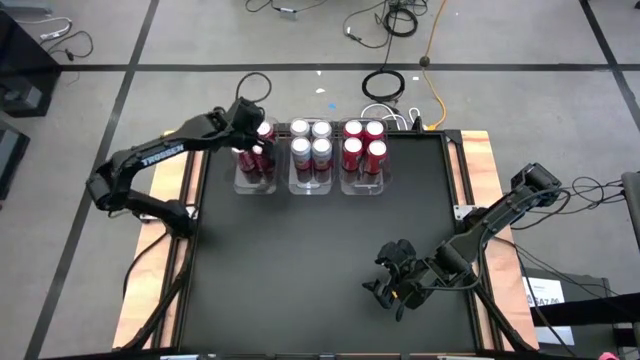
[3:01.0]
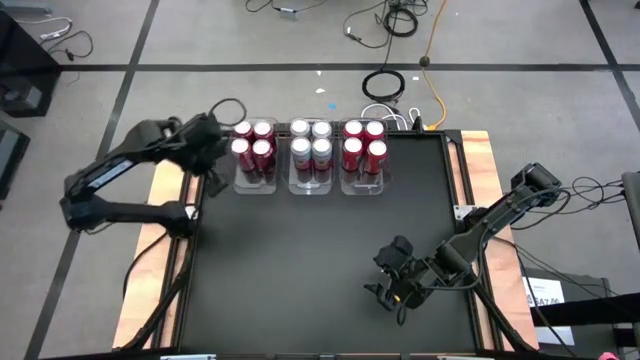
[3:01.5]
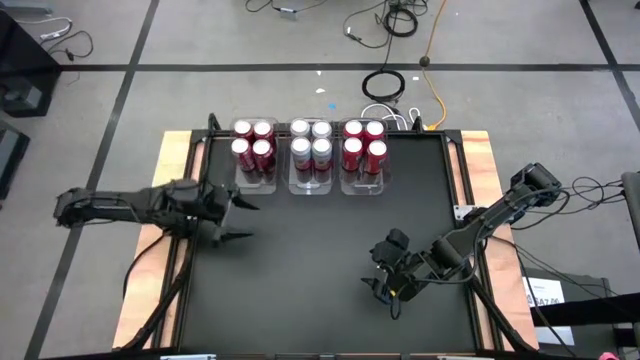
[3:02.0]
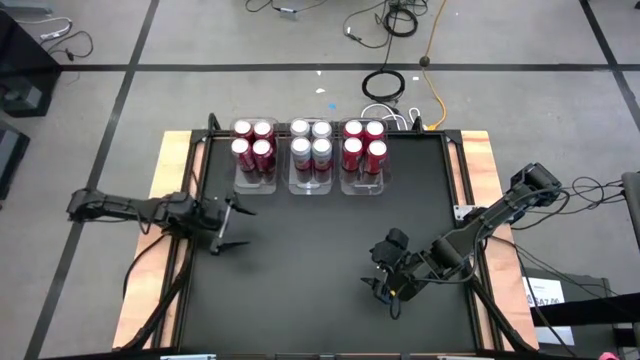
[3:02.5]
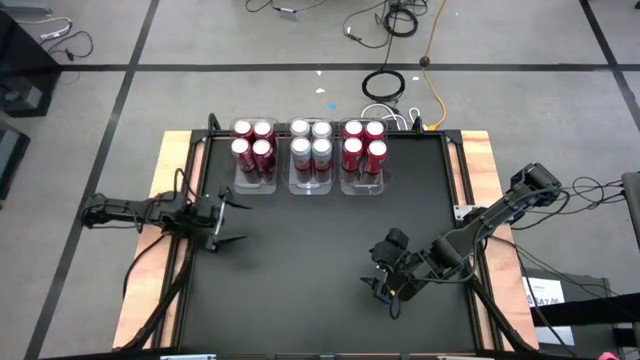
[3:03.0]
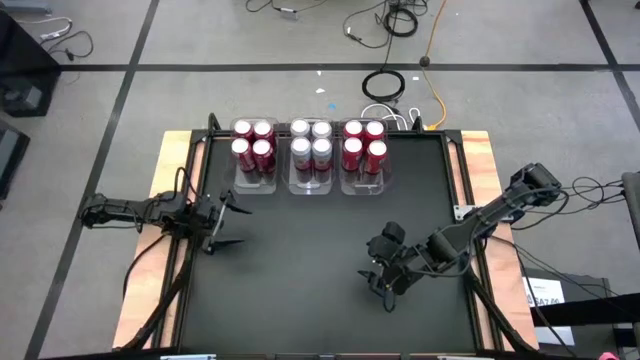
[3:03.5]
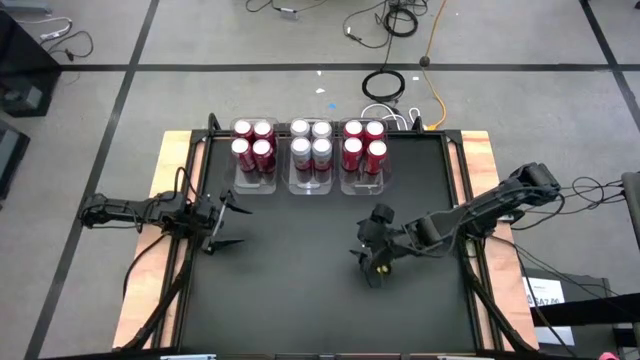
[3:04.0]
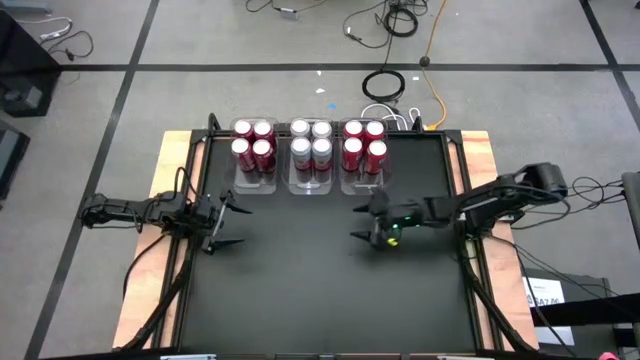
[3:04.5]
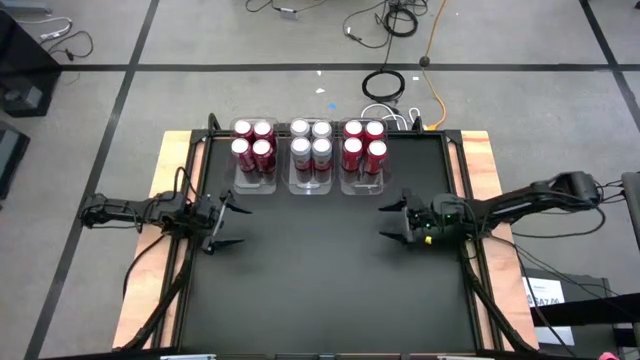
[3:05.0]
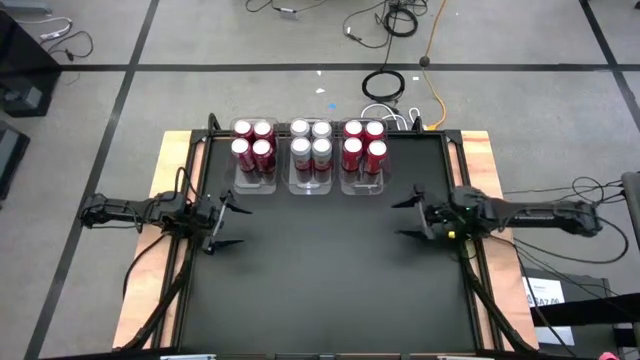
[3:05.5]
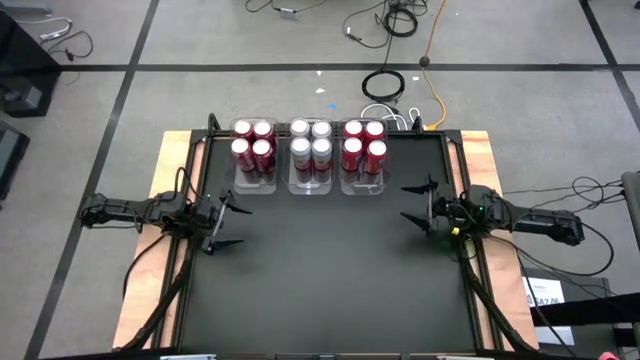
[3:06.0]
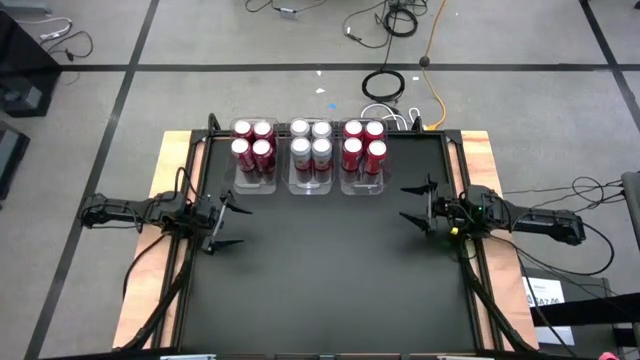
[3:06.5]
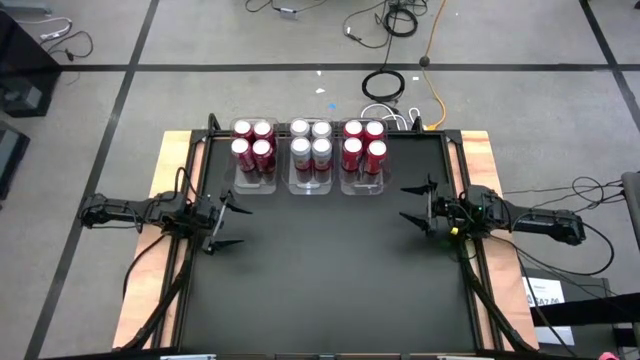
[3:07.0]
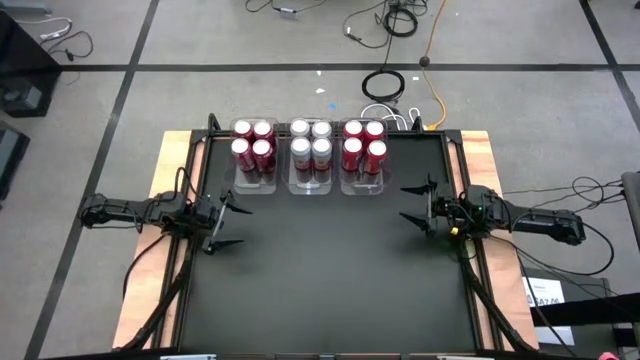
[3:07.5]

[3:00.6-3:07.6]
Task: Sort soda cans
Return to Home Position

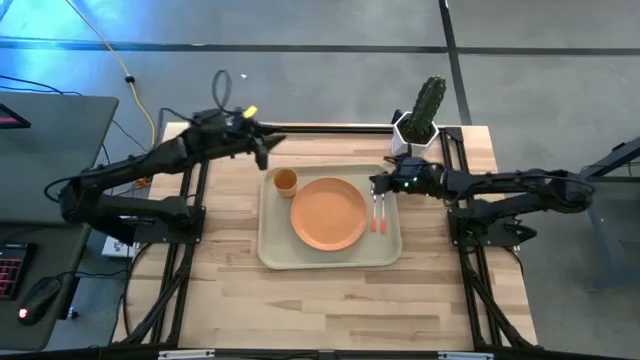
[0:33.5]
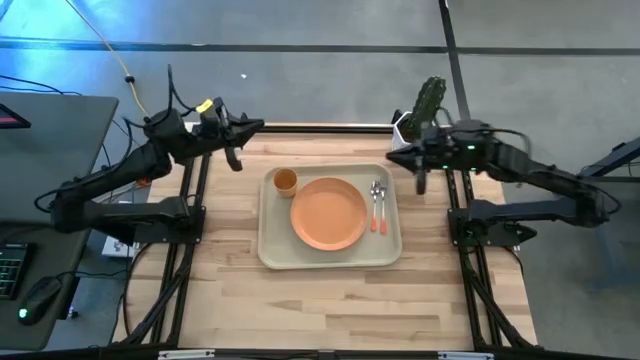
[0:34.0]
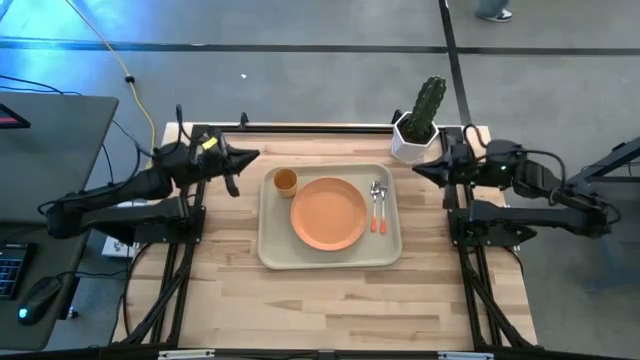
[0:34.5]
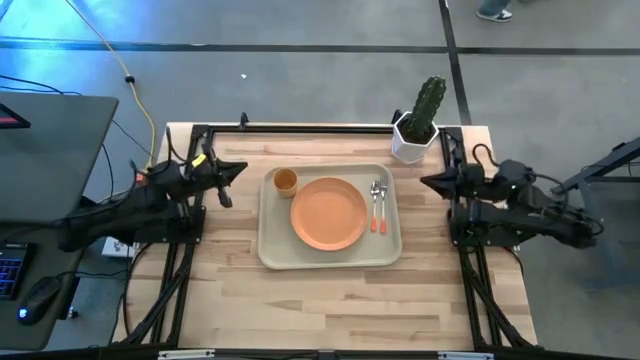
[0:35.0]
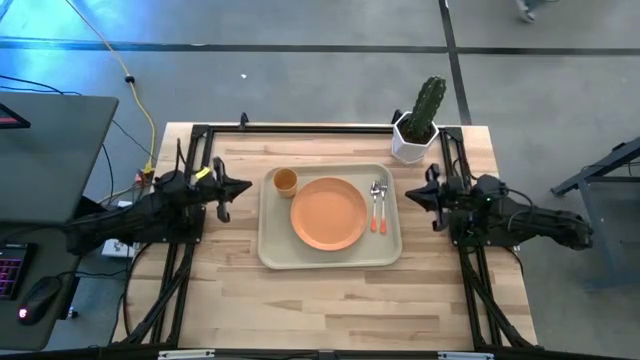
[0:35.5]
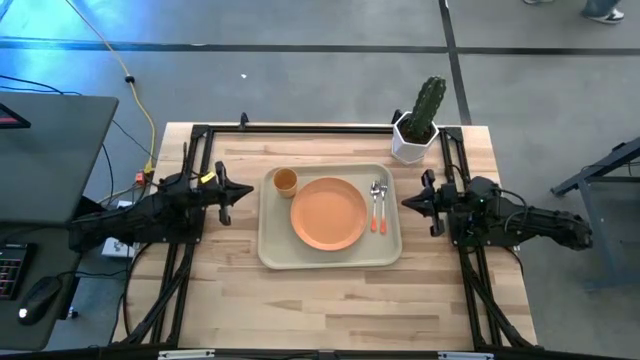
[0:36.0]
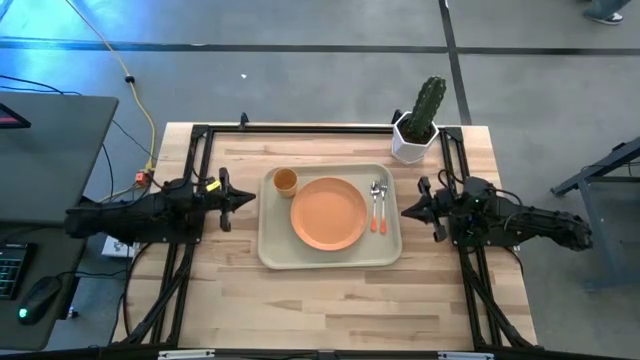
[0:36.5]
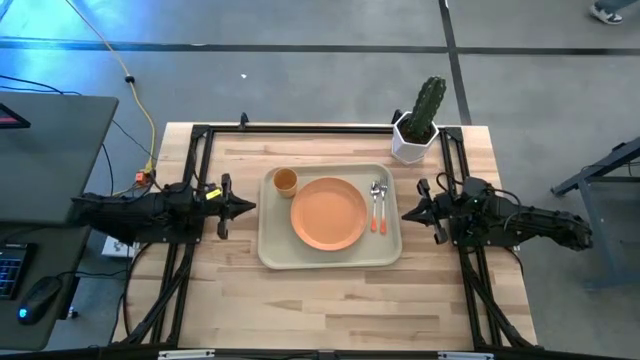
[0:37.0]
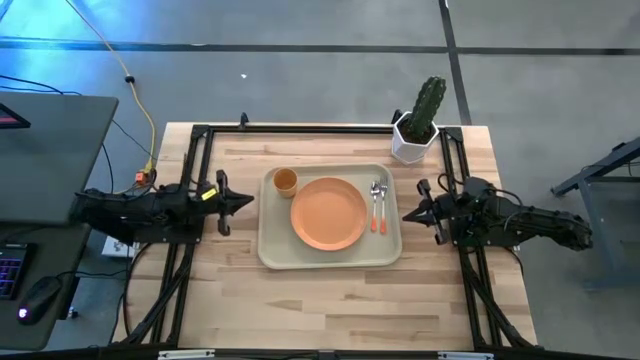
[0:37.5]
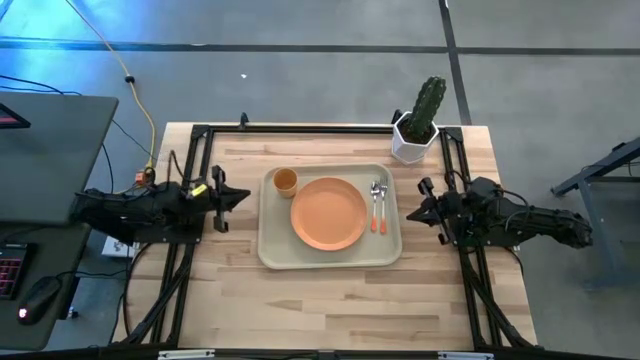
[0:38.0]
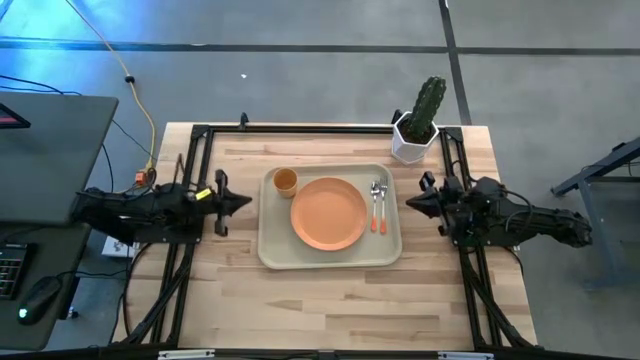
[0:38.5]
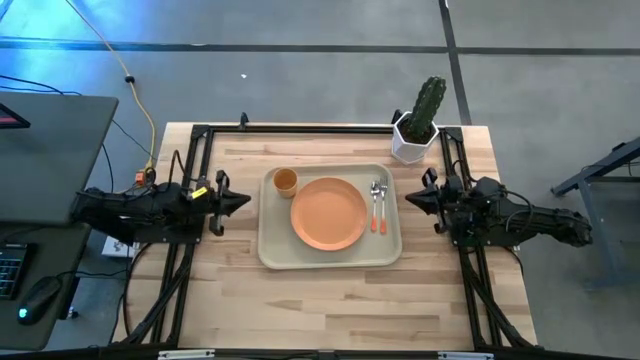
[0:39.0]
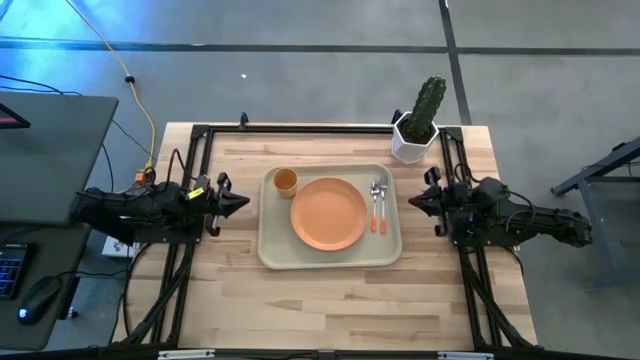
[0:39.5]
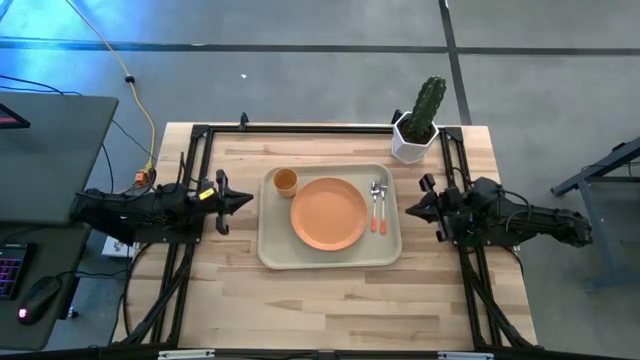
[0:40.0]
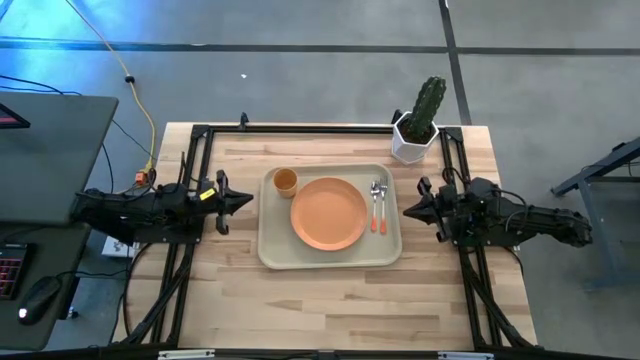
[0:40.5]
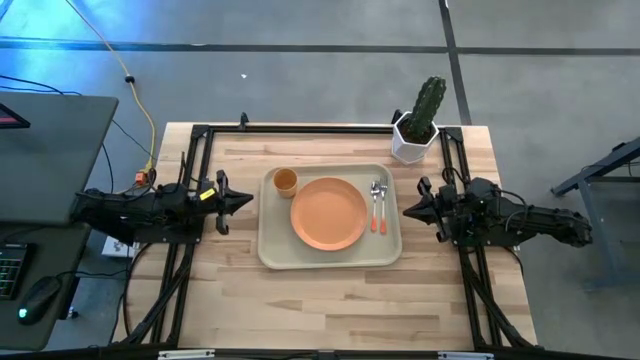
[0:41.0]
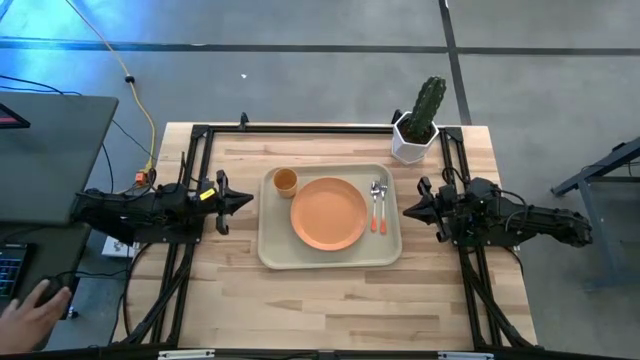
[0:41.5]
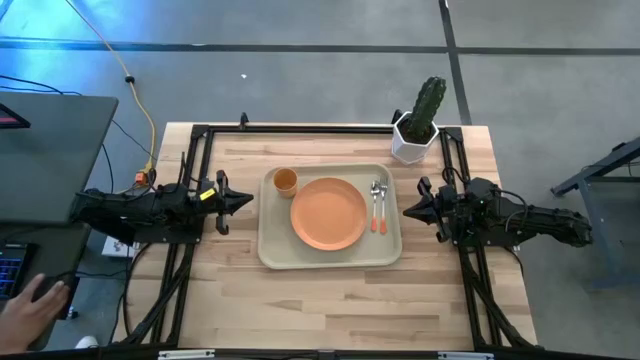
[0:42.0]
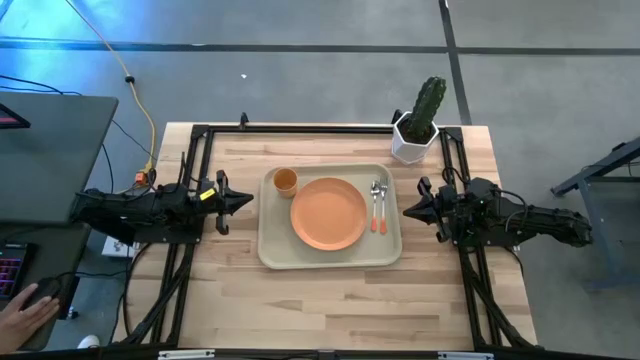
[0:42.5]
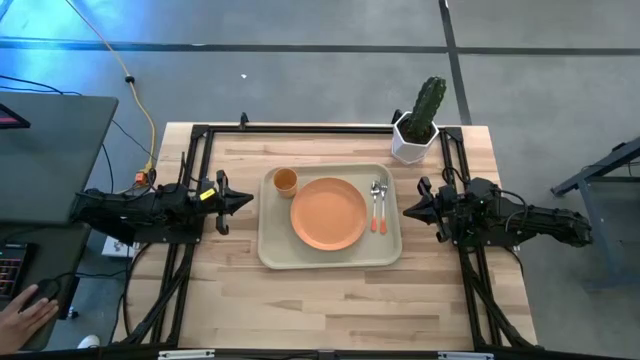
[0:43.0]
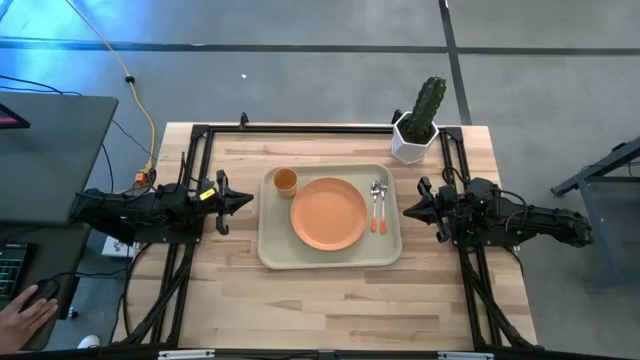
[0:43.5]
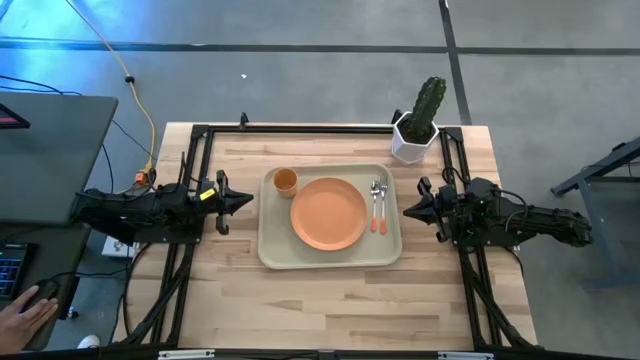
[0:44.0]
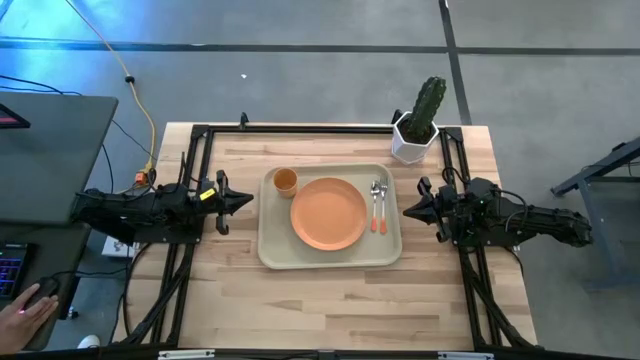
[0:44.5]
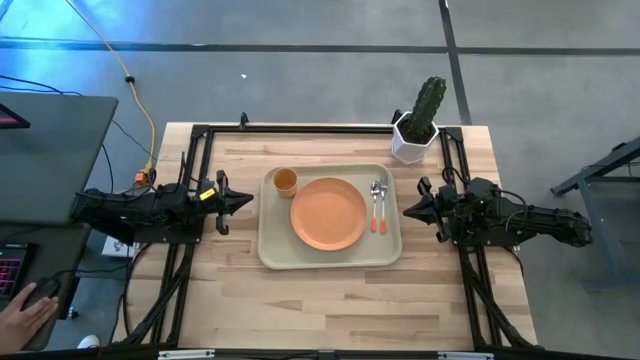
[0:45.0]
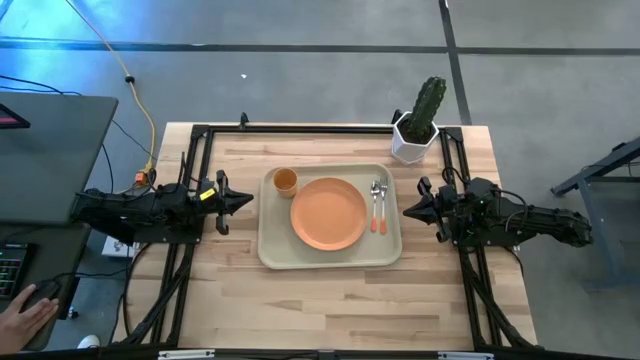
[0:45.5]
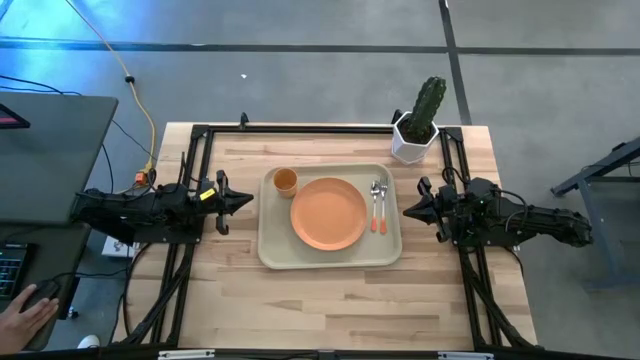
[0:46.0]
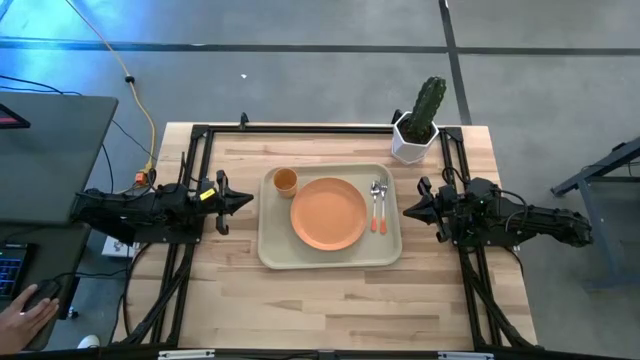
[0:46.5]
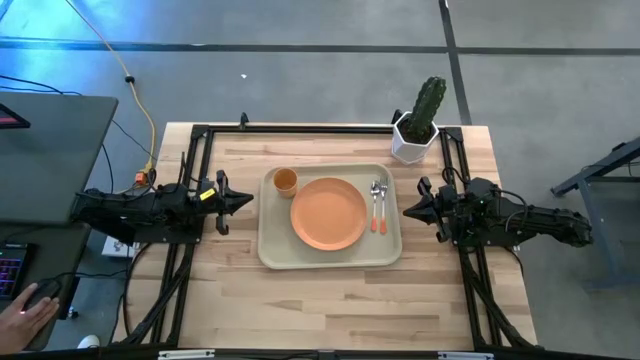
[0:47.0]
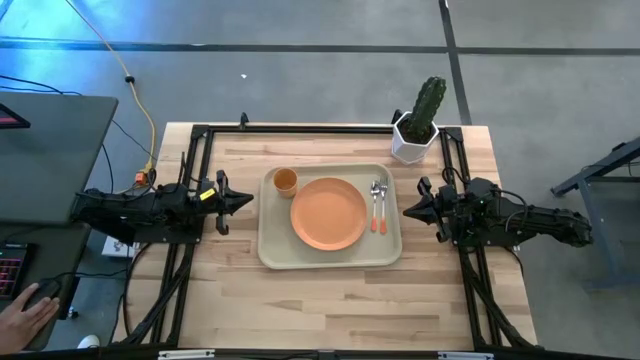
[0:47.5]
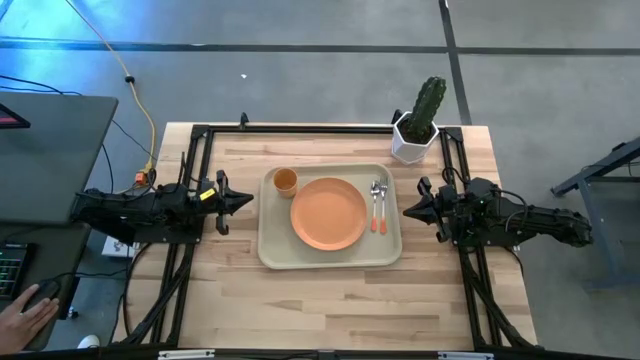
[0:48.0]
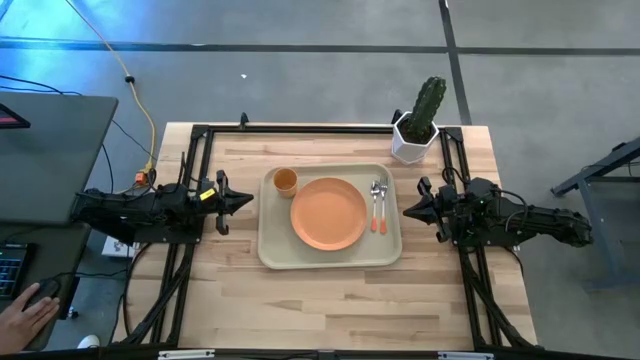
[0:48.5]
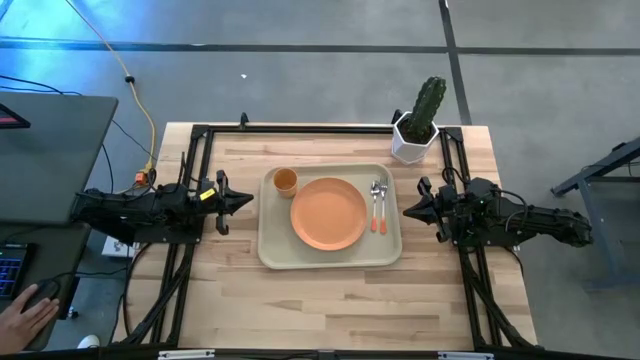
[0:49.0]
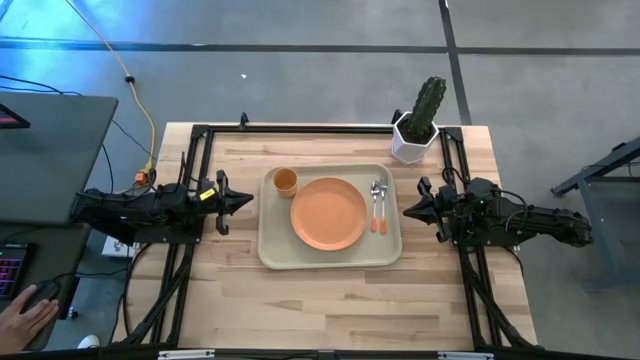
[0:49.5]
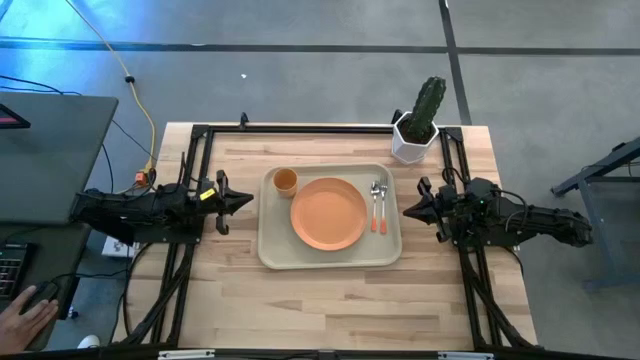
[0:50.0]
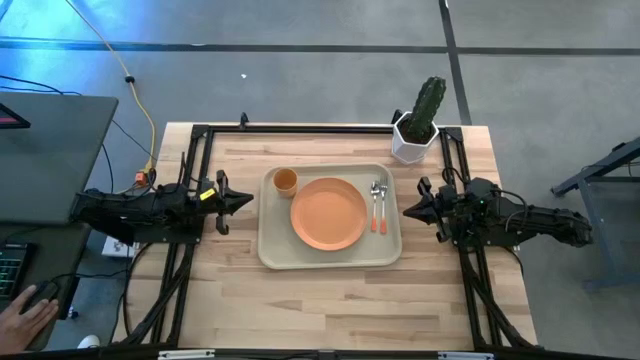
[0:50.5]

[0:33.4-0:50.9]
Task: Pick and place plate/cup/fork/spoon on tray
Return to Home Position
